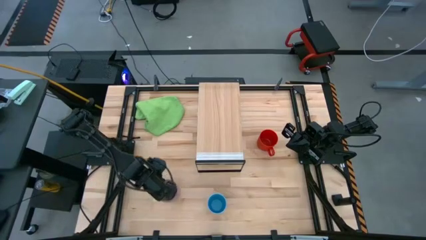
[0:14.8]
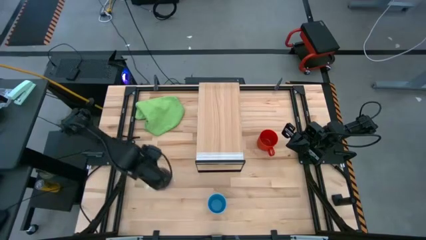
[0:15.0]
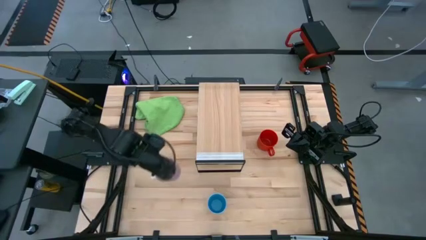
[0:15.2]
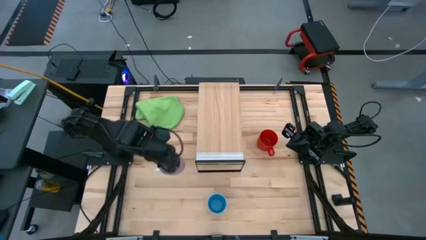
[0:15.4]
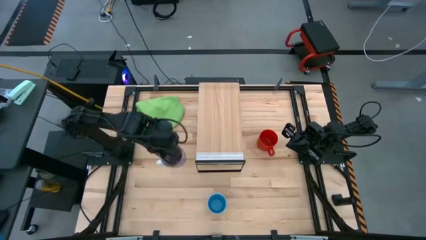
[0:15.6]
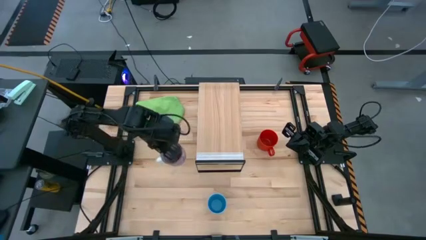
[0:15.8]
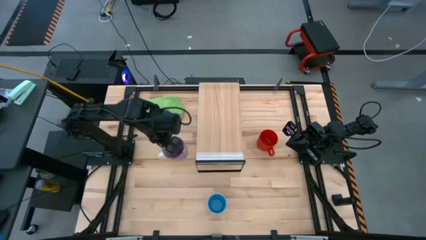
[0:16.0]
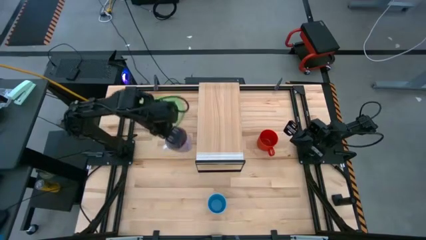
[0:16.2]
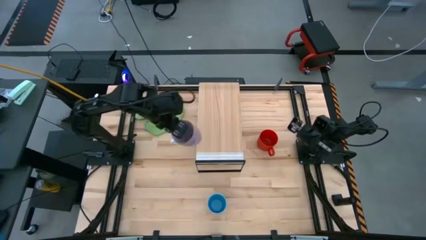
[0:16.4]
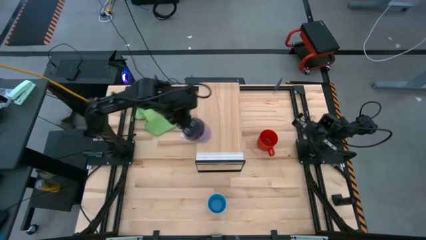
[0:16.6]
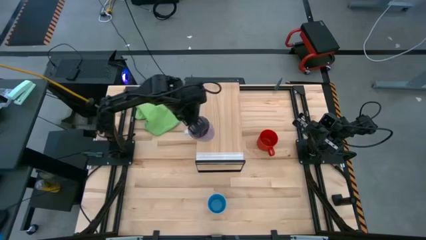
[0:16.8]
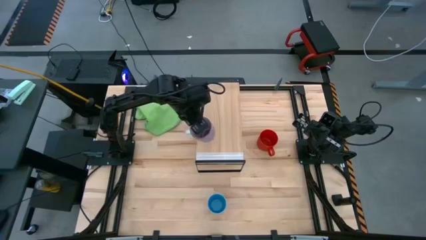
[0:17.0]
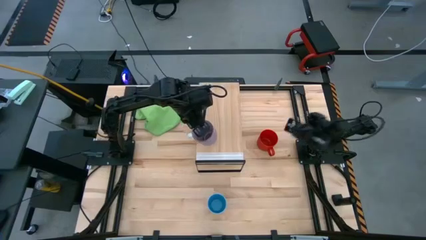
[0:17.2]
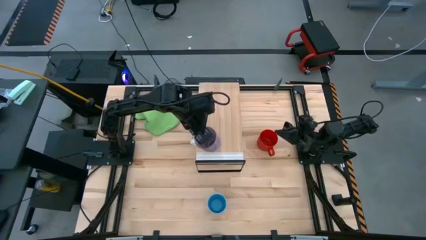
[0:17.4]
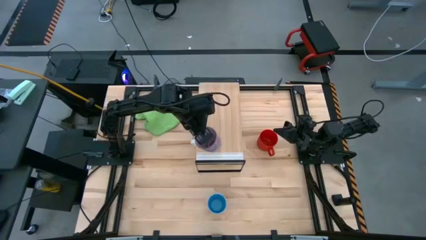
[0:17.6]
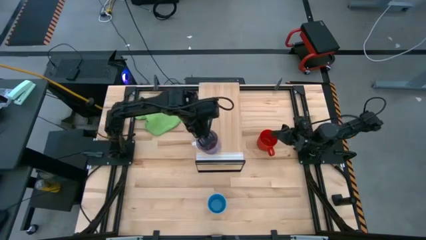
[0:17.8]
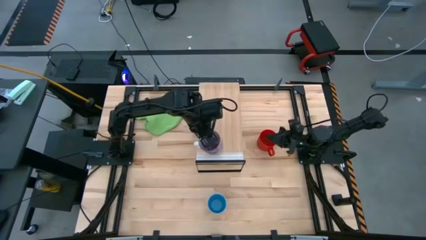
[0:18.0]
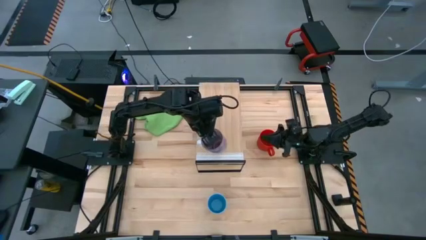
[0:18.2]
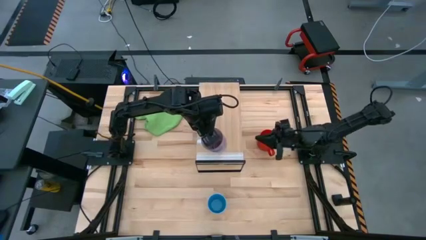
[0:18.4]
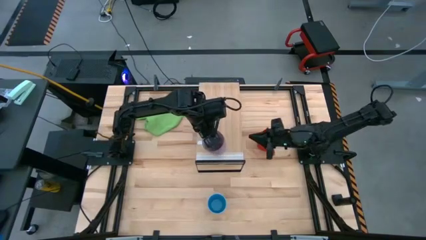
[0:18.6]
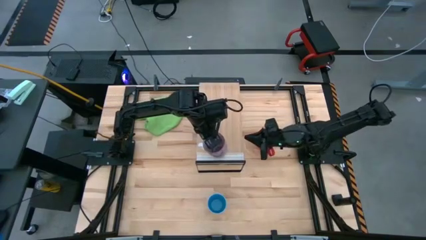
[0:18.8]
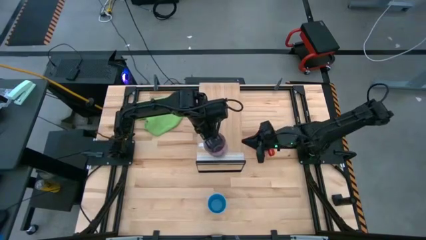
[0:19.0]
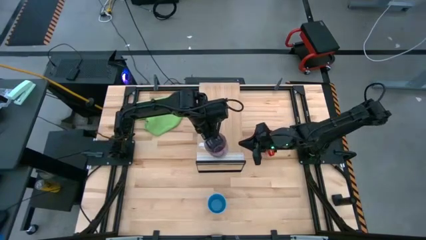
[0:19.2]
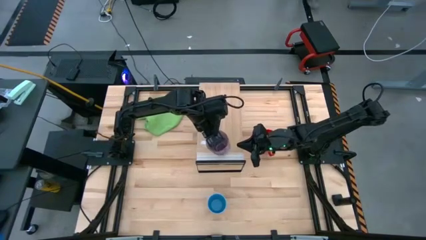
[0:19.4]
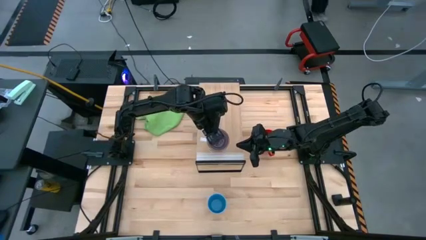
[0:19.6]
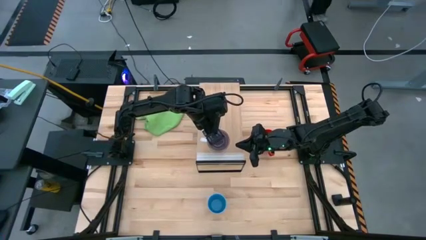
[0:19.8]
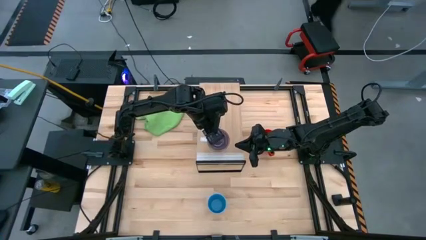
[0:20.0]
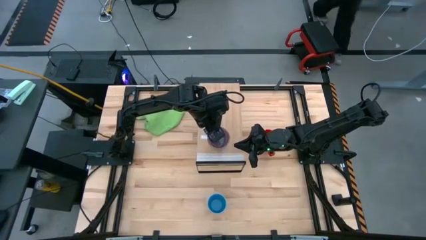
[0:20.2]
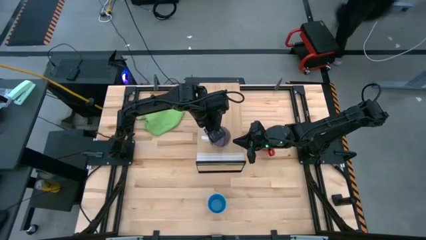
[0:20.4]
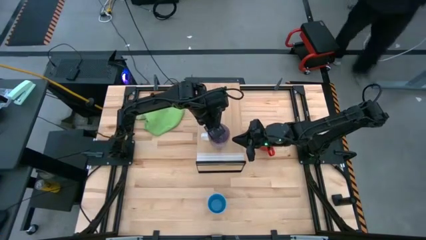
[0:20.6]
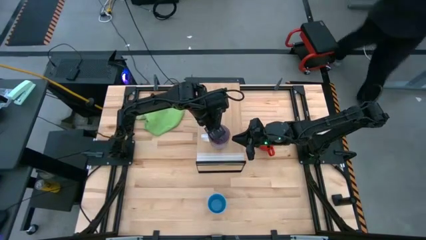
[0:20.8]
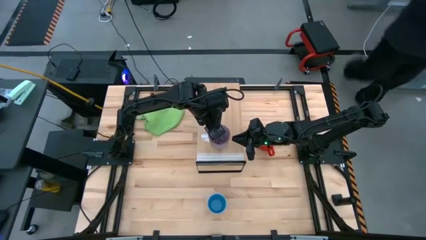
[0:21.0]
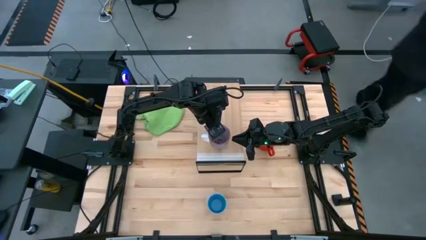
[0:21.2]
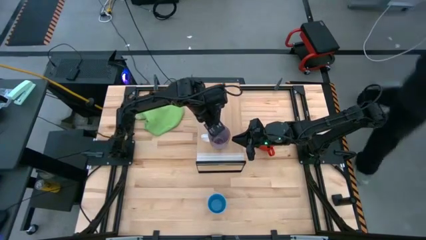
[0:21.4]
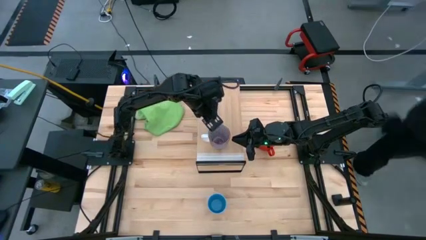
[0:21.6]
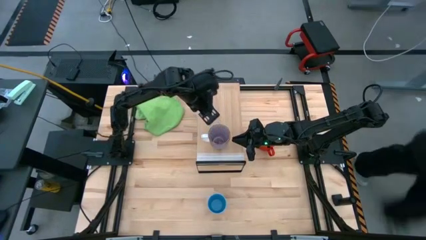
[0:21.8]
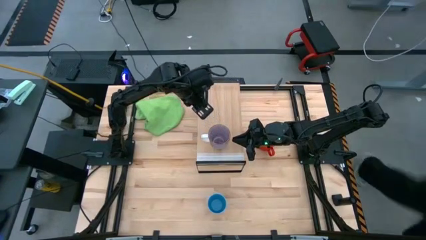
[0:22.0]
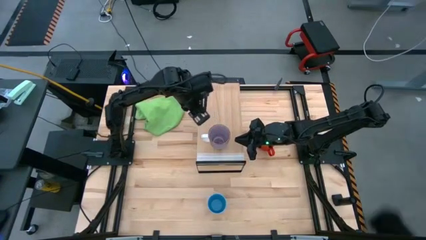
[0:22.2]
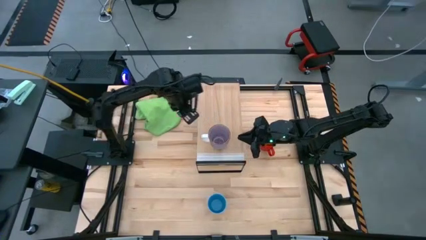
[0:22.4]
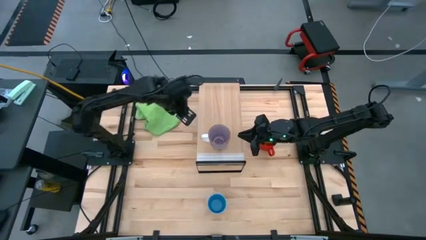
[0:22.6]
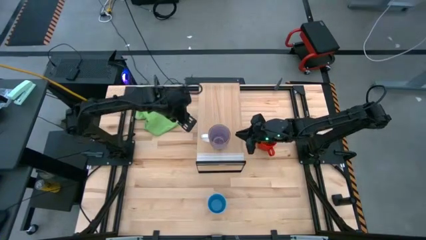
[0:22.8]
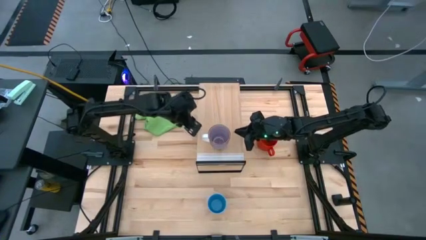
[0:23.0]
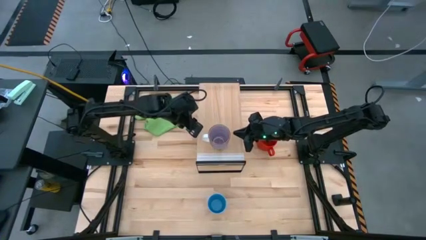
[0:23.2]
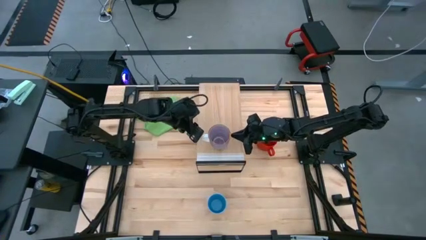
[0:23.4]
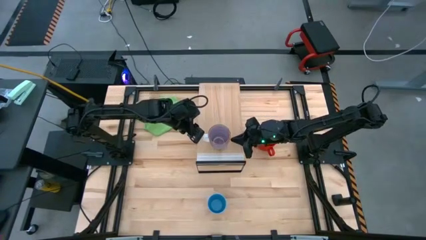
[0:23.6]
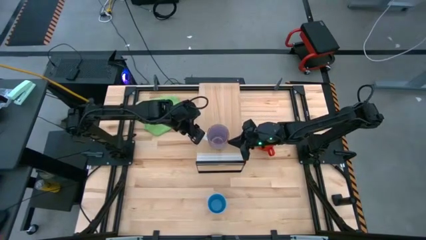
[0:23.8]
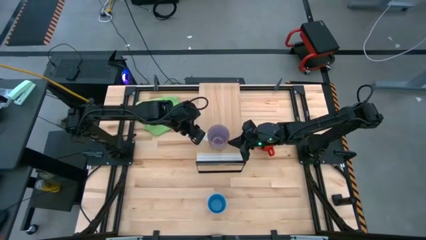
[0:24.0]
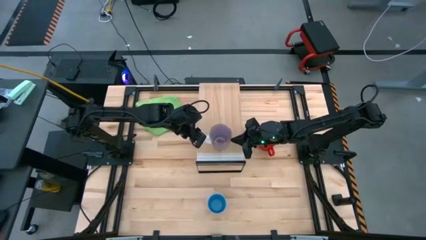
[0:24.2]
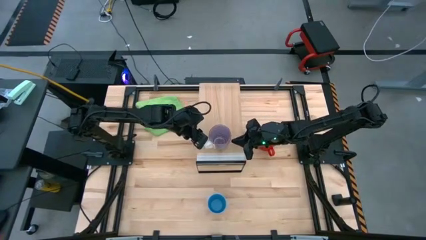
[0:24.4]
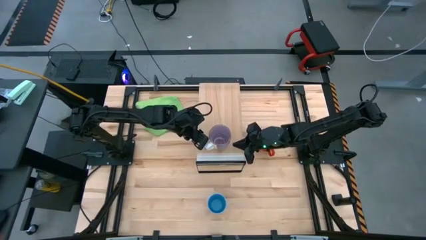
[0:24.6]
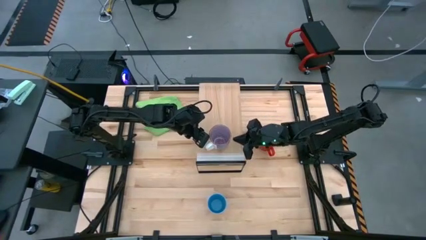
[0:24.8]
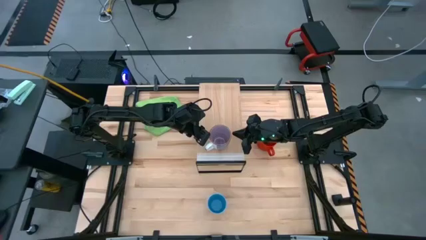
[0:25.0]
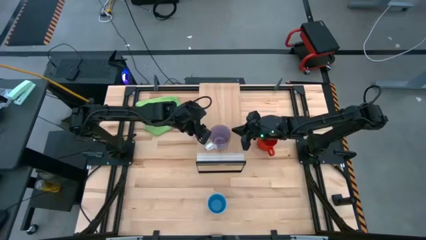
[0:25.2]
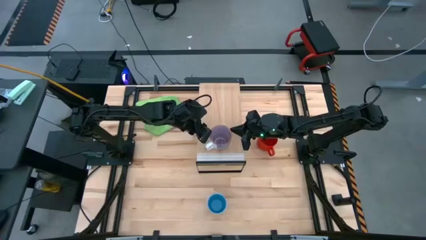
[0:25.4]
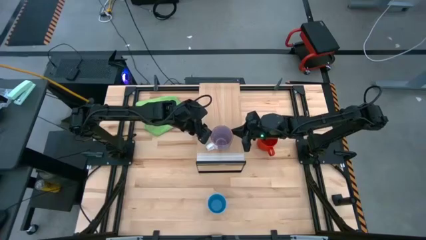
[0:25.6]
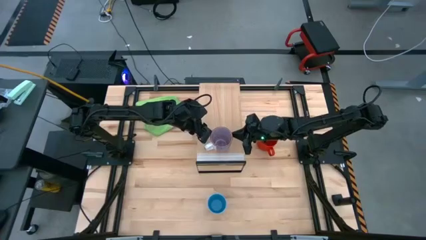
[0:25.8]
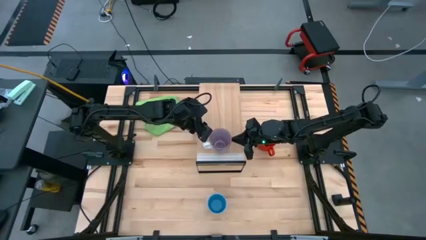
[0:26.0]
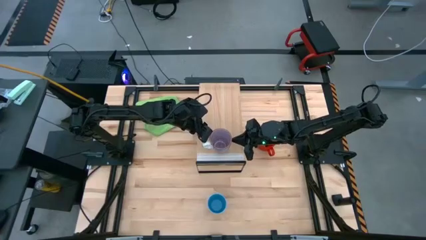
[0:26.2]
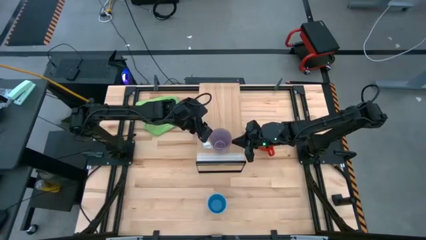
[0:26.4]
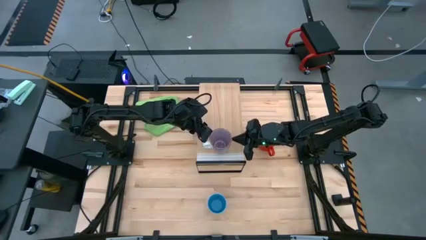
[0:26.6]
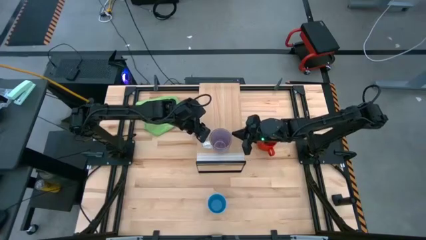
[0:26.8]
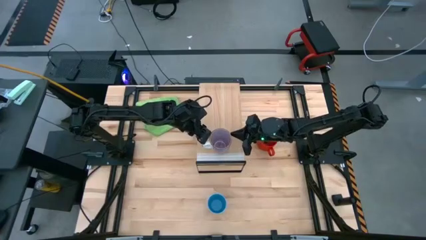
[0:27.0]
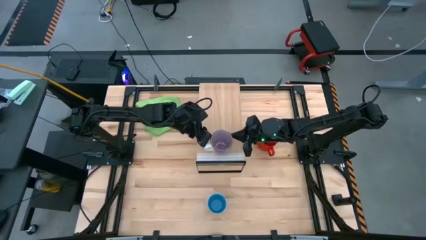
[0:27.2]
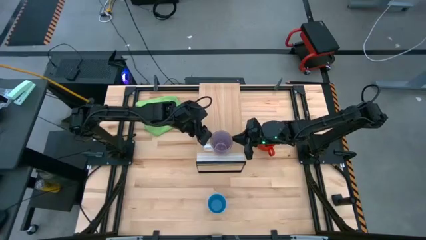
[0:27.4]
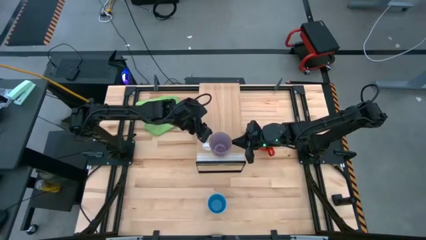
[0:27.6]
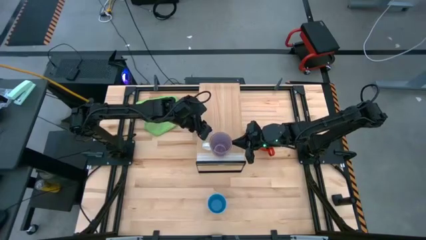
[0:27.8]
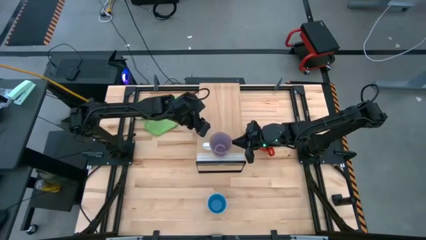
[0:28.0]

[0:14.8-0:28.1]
Task: Stack small to large cups/mugs on shelf
Put the violet mug on the shelf
